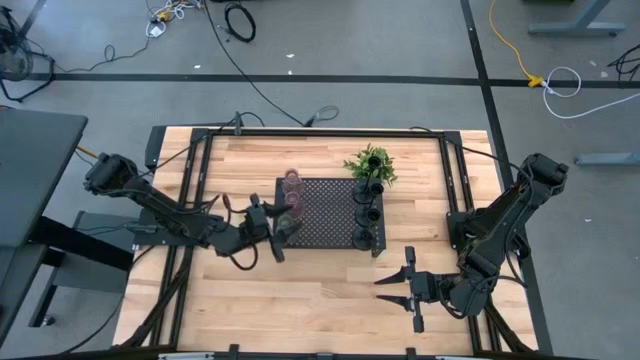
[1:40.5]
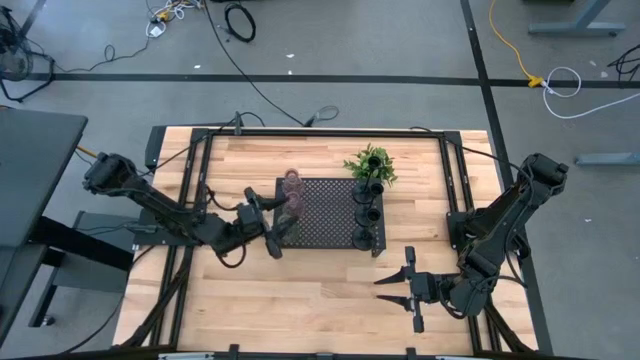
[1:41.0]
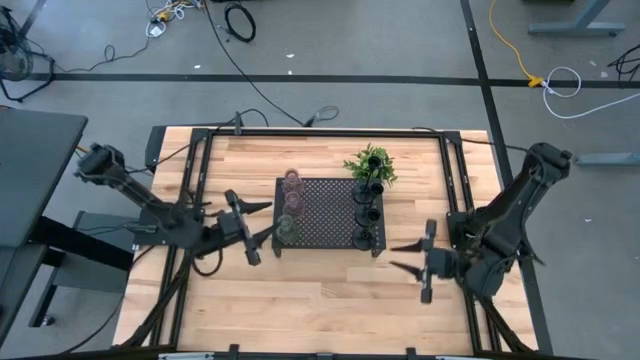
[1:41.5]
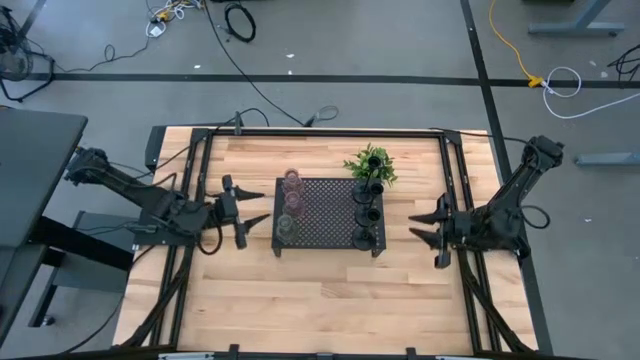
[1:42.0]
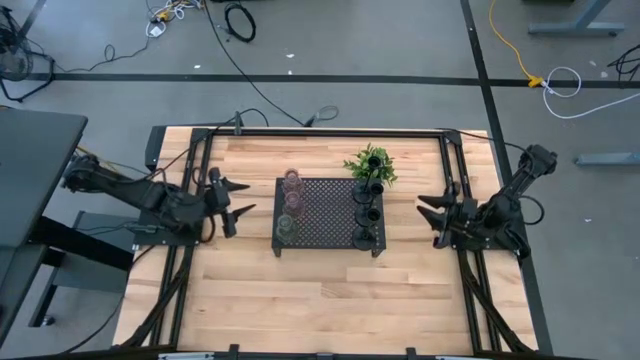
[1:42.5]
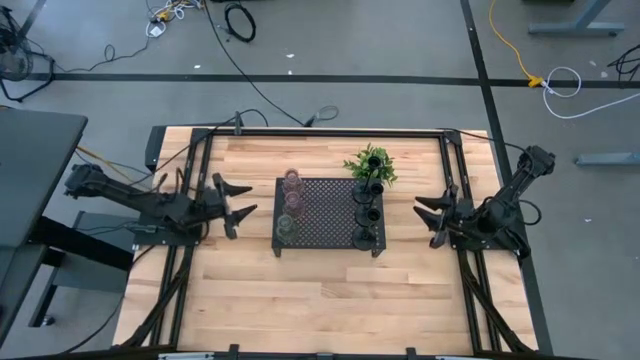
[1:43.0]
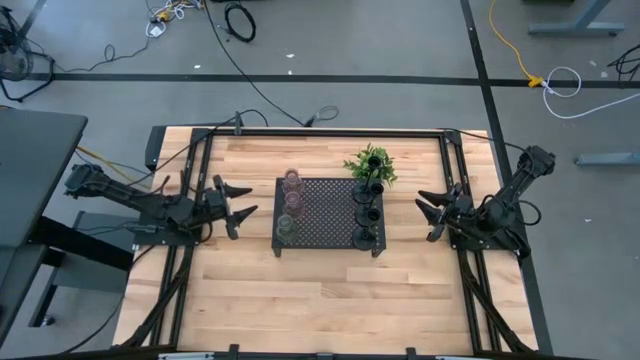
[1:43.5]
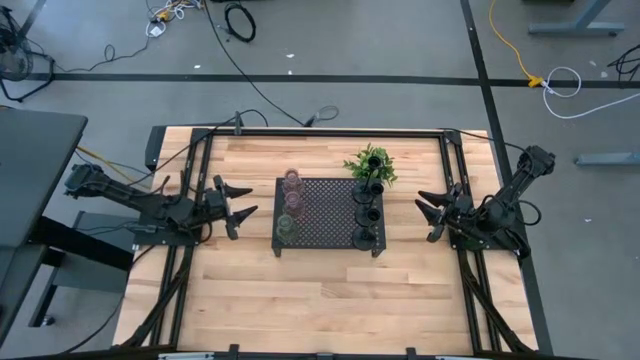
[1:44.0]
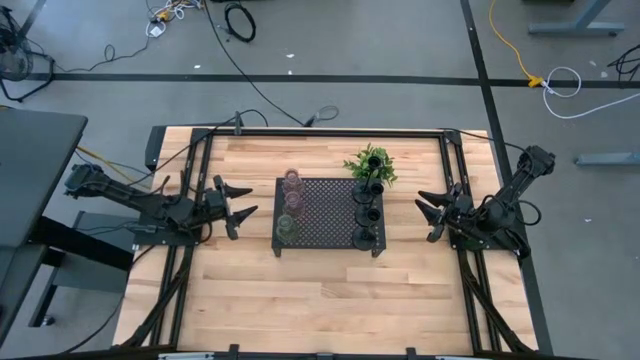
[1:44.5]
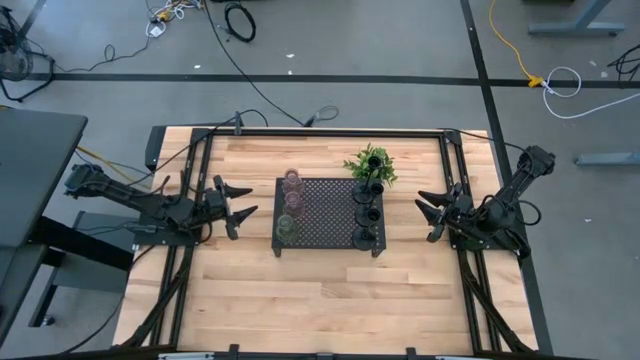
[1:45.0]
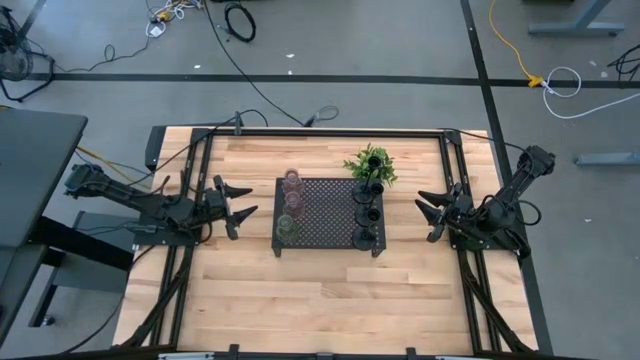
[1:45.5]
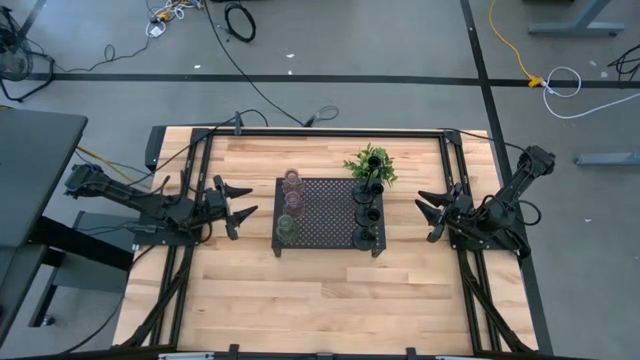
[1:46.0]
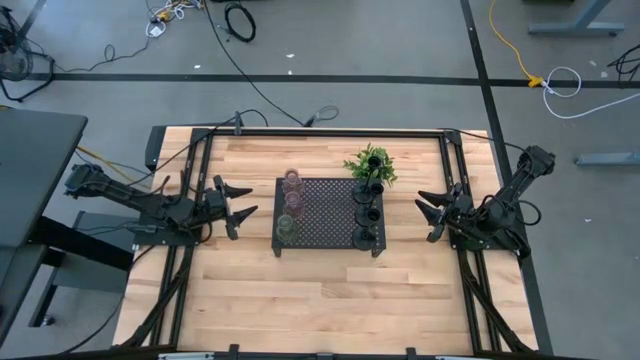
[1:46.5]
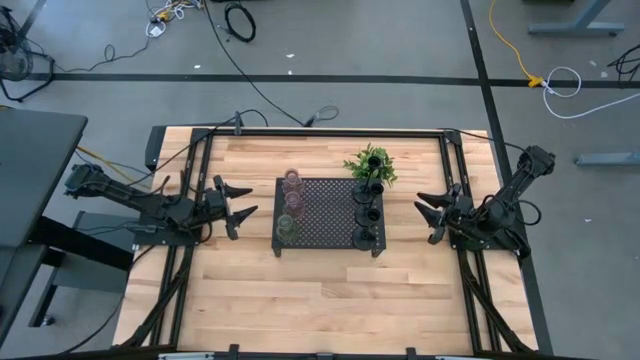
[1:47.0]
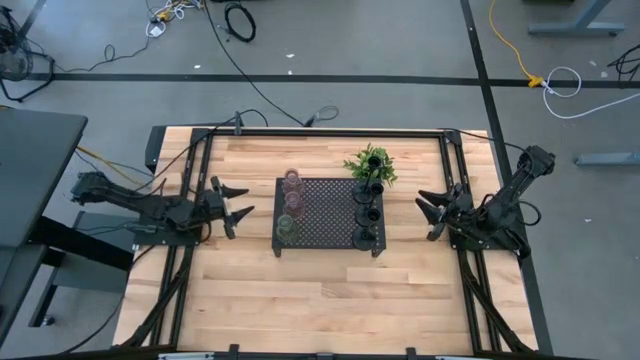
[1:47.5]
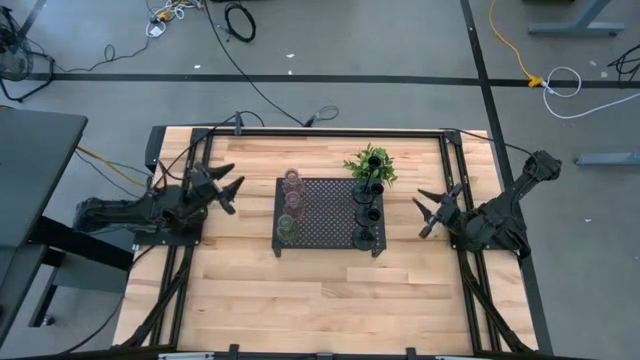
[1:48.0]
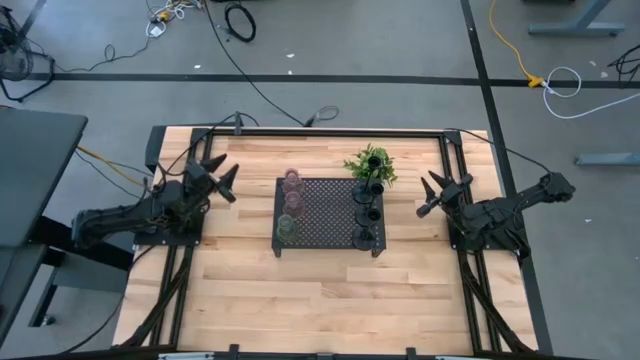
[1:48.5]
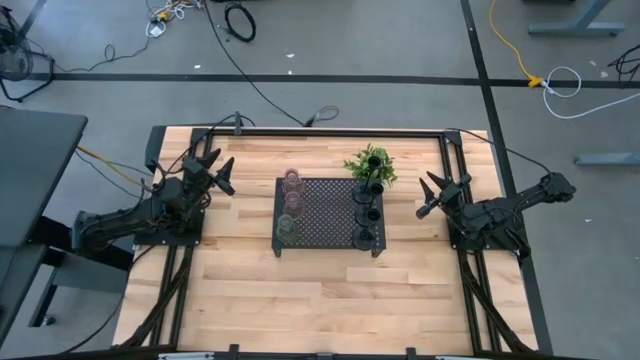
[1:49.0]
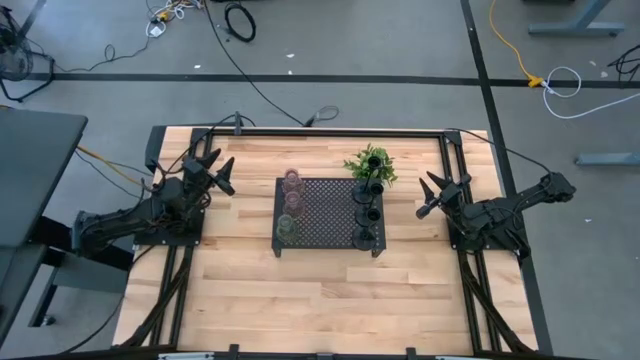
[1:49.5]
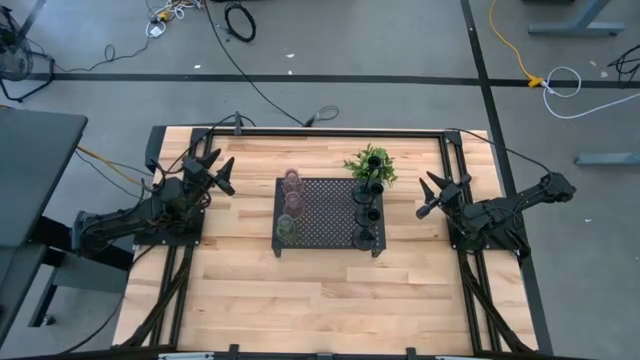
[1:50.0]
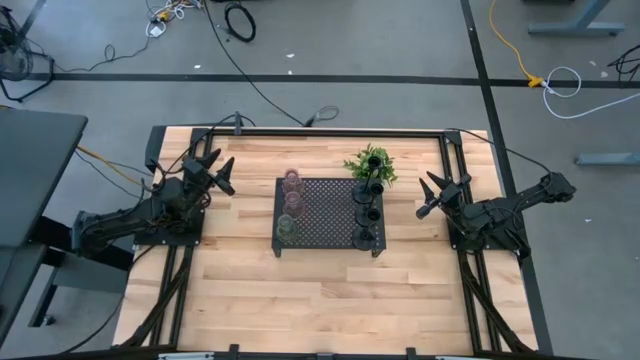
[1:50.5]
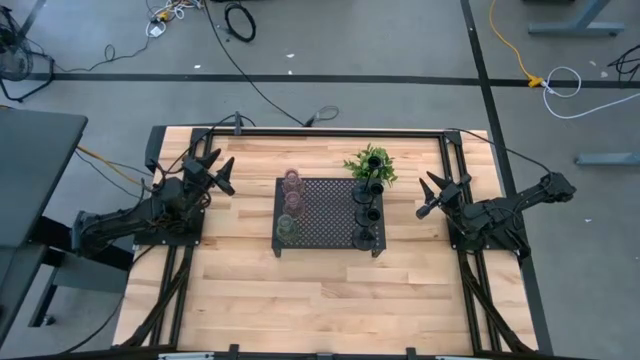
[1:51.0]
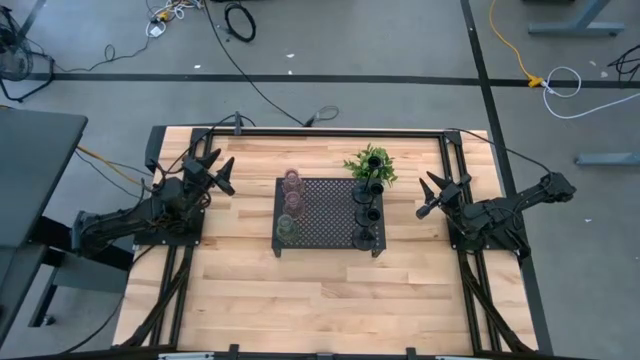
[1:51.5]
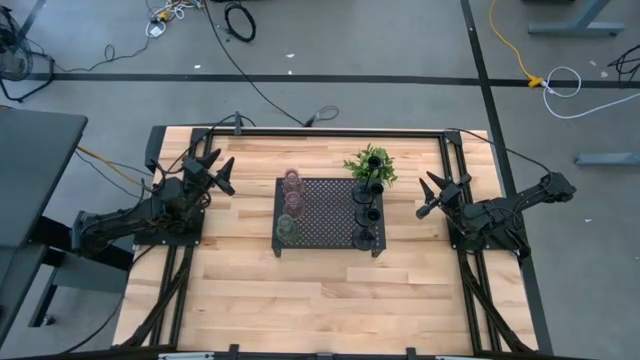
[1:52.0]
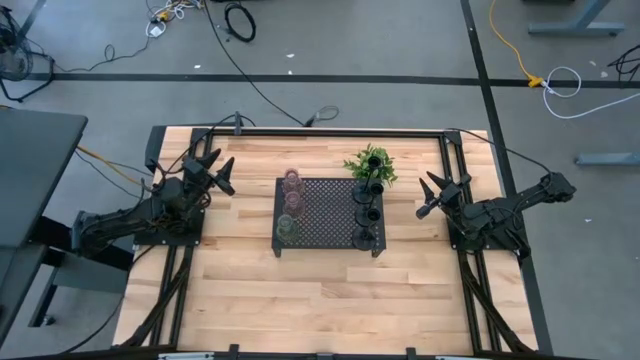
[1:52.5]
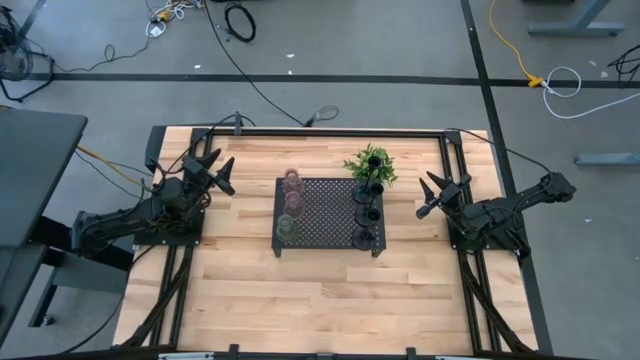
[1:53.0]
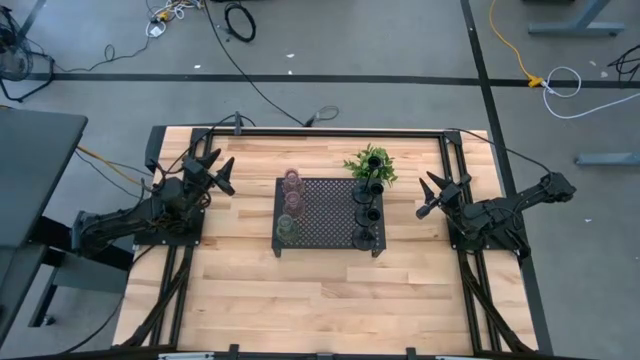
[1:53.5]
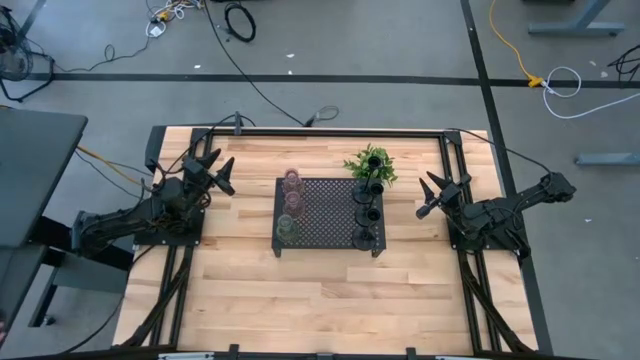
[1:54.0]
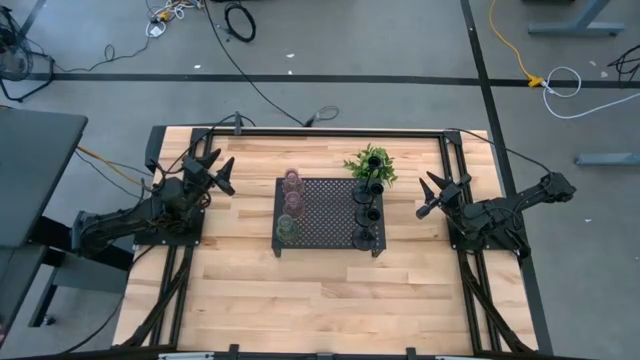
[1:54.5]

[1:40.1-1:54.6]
Task: Pick & Place candle stick holders
Return to Home Position

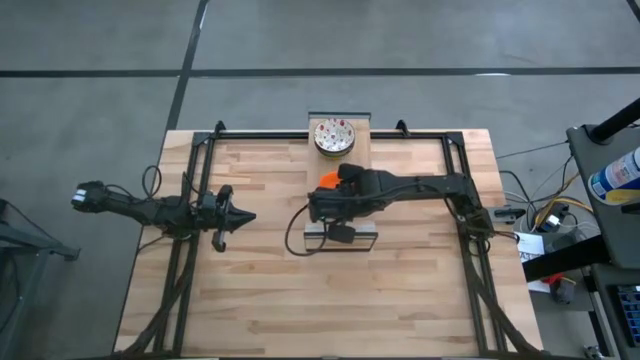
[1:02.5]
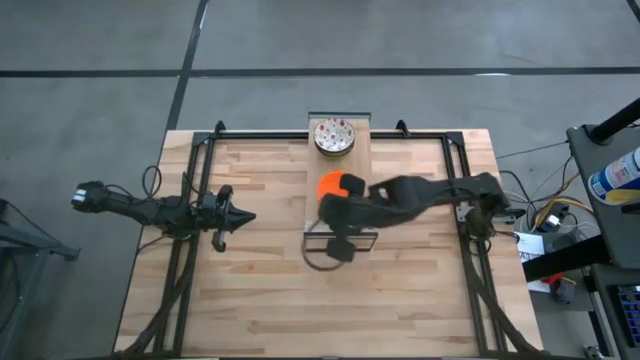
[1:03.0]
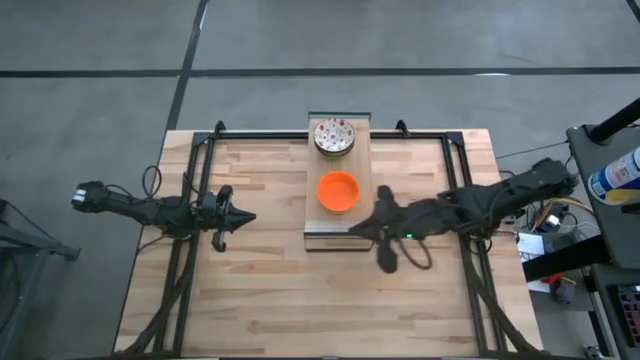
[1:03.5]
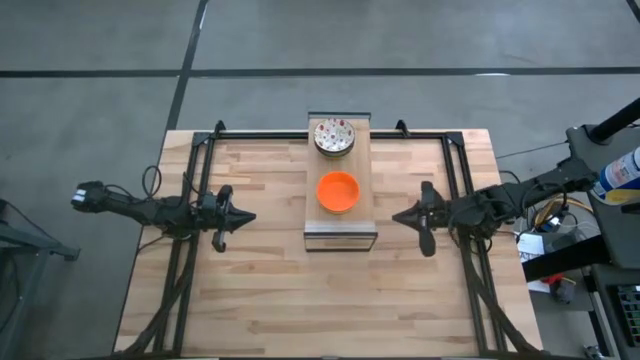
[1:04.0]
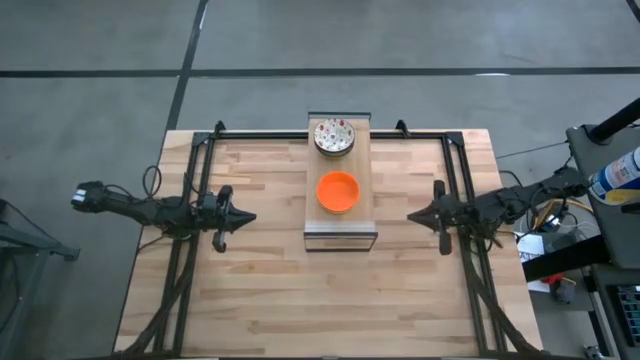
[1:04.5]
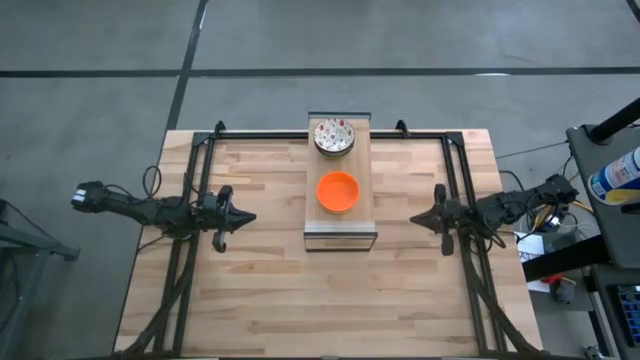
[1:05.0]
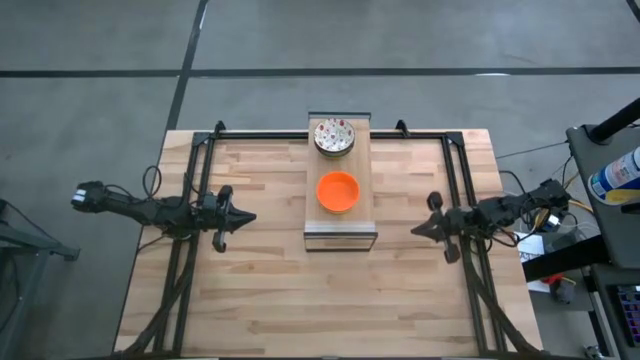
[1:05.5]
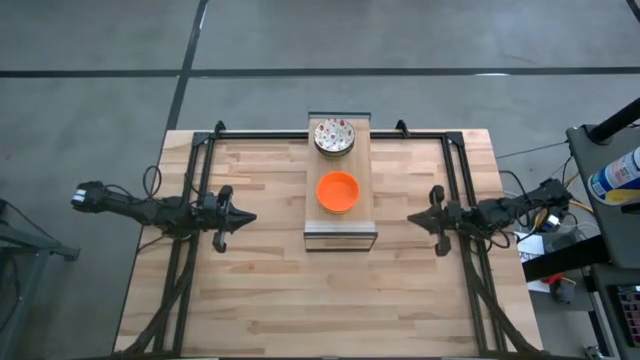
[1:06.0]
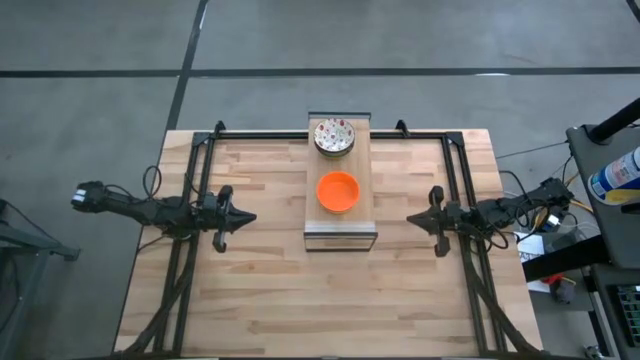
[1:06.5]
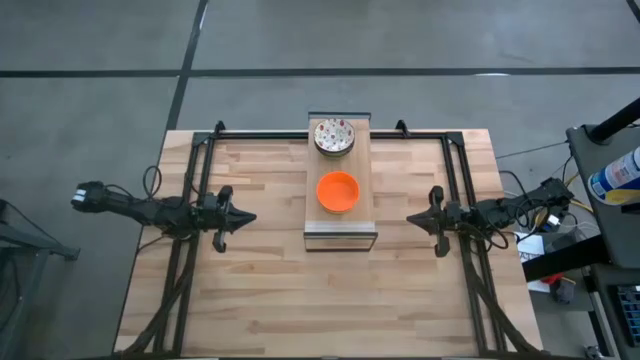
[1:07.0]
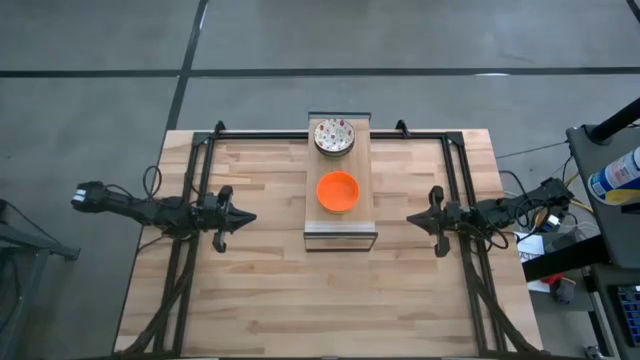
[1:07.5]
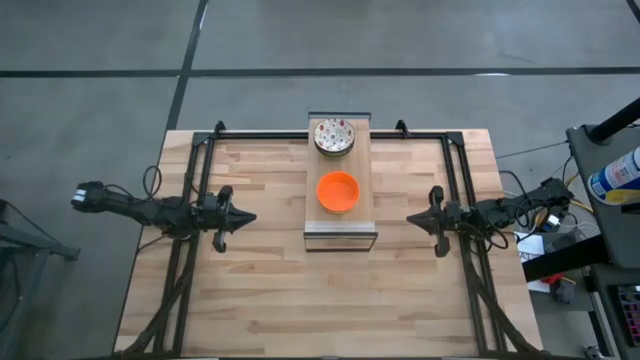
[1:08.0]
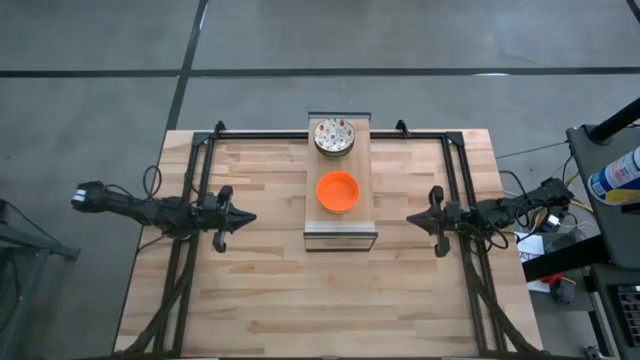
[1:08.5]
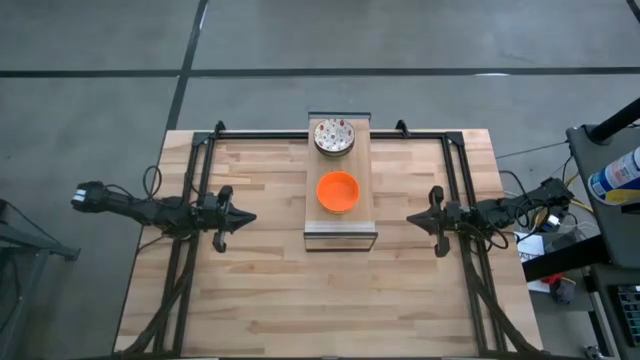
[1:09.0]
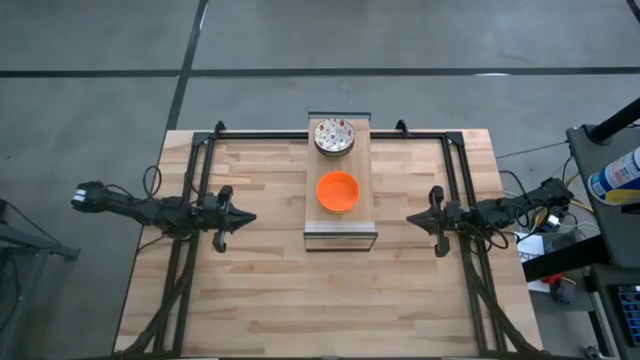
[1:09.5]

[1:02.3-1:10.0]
Task: Pick & Place Mini bowls
Return to Home Position
